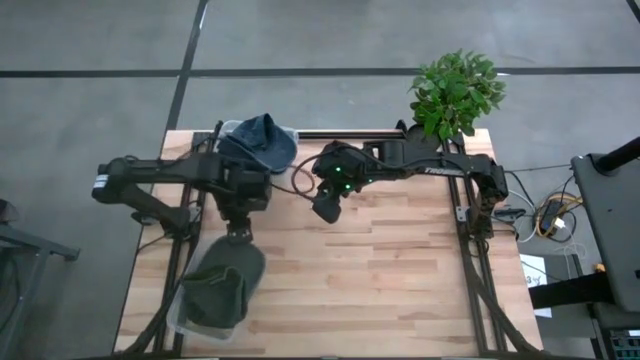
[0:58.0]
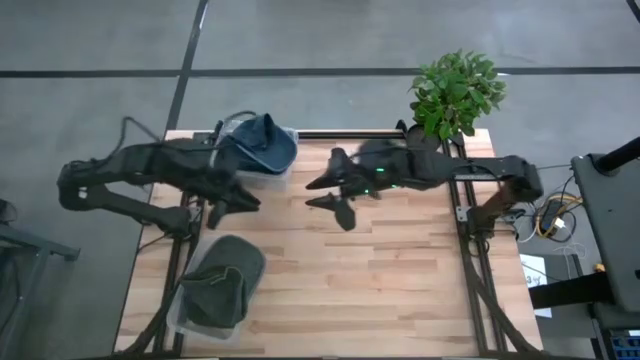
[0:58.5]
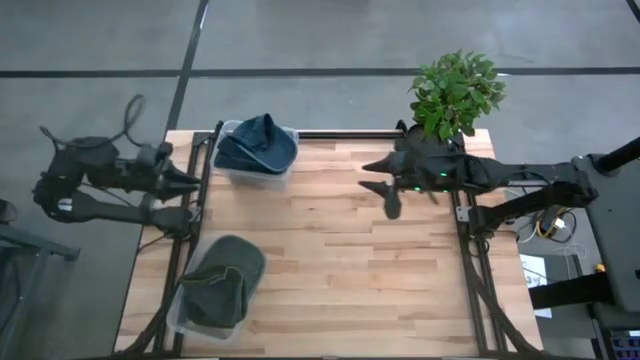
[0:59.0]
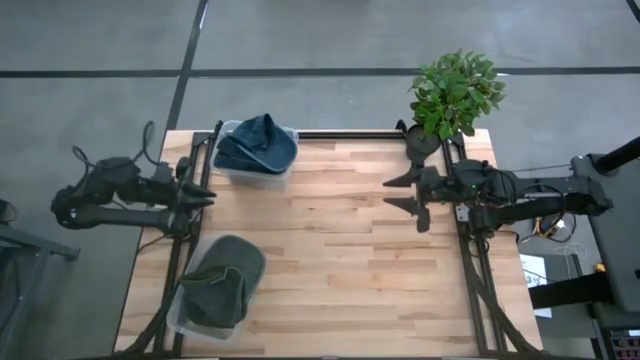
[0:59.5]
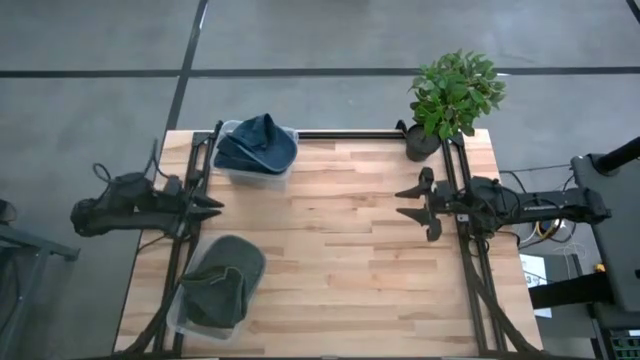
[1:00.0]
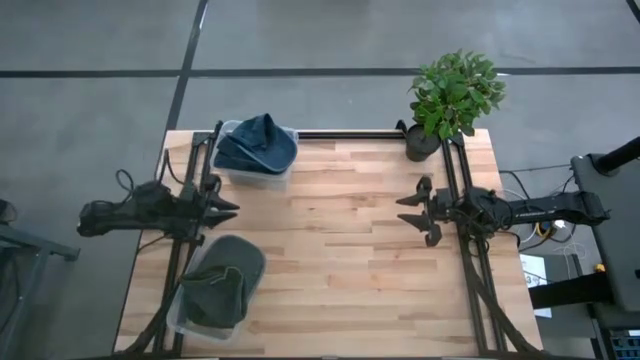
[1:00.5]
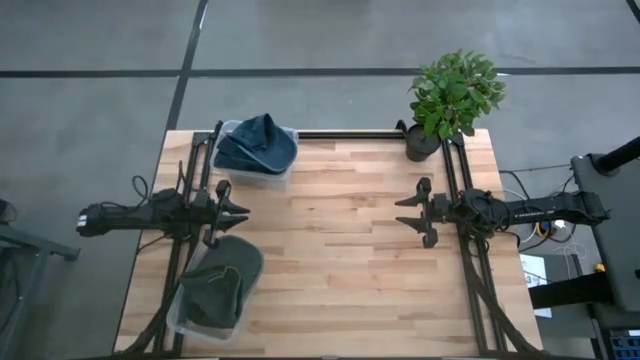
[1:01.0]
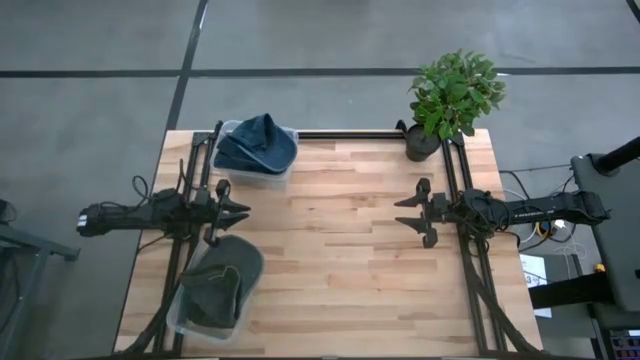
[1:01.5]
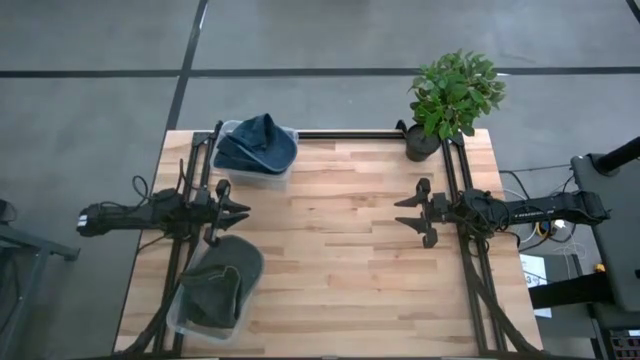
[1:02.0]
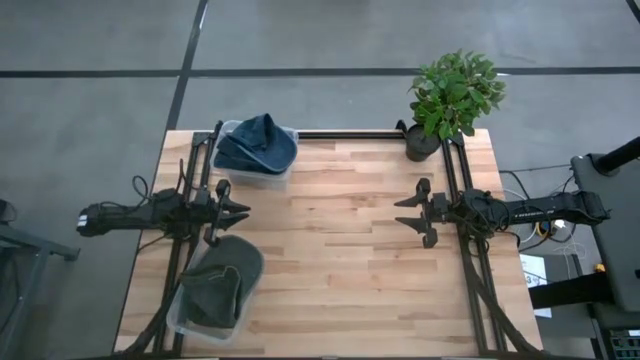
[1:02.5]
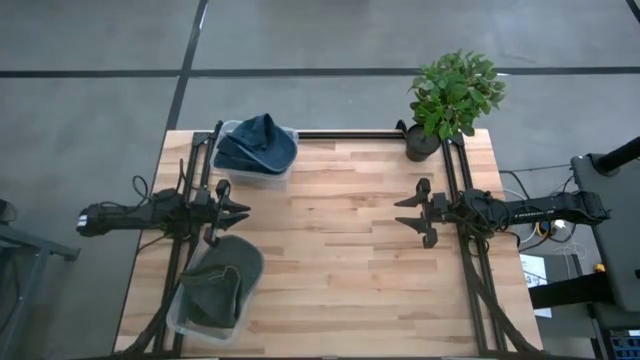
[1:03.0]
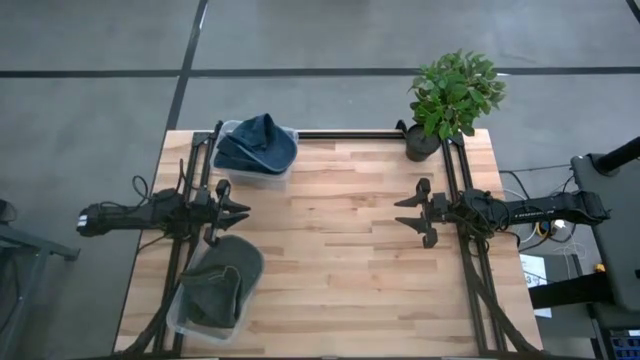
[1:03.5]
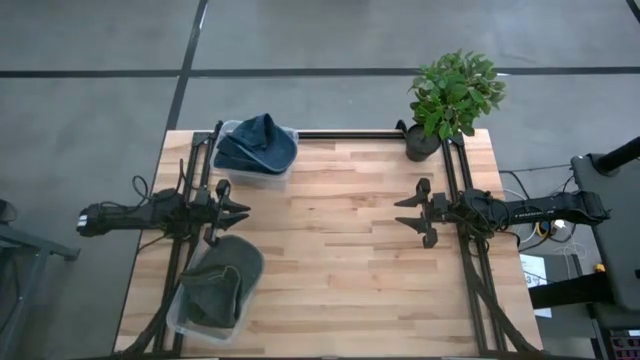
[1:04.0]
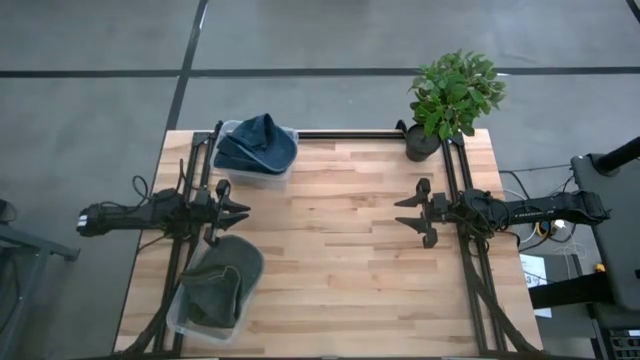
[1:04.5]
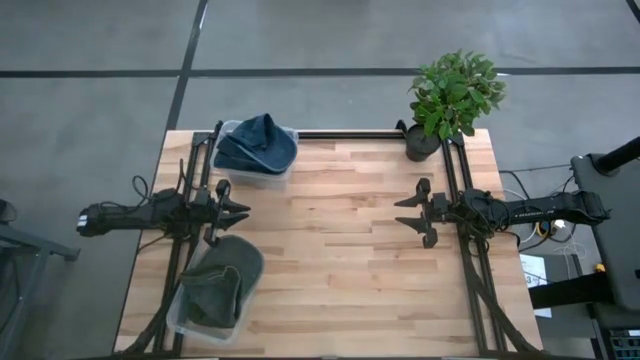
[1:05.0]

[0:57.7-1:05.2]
Task: Pick & Place hat
Return to Home Position

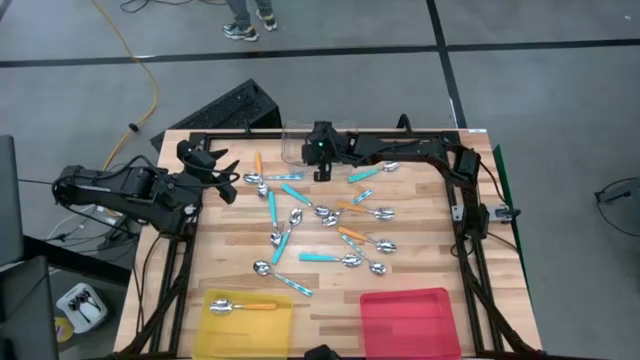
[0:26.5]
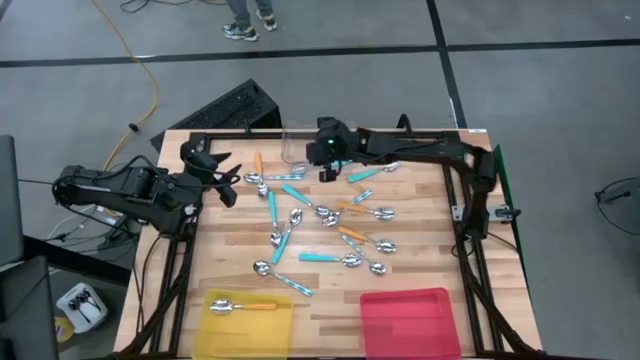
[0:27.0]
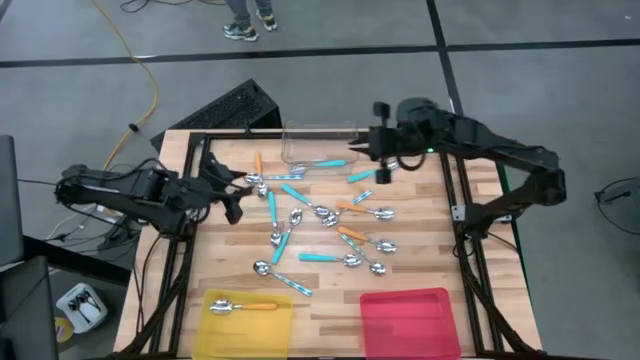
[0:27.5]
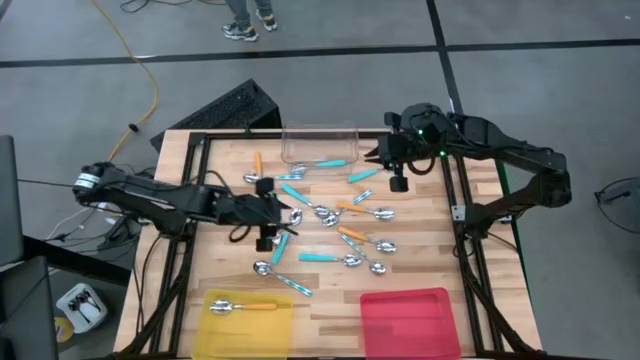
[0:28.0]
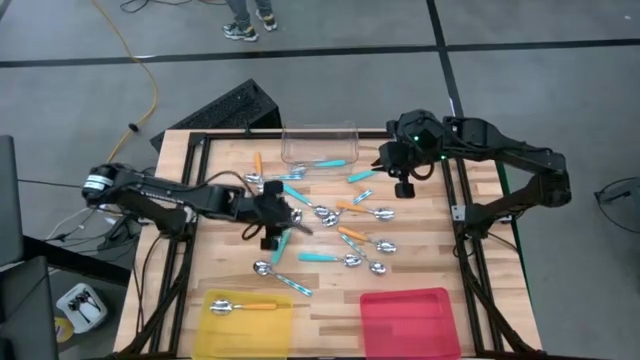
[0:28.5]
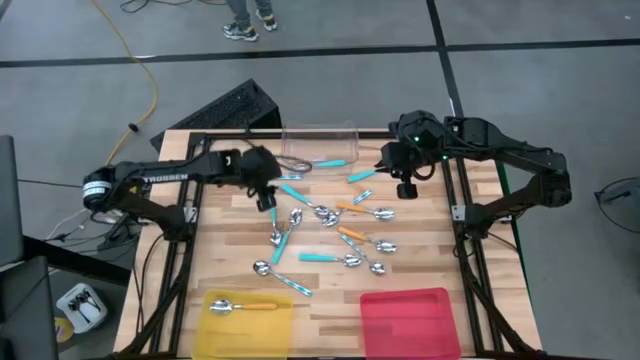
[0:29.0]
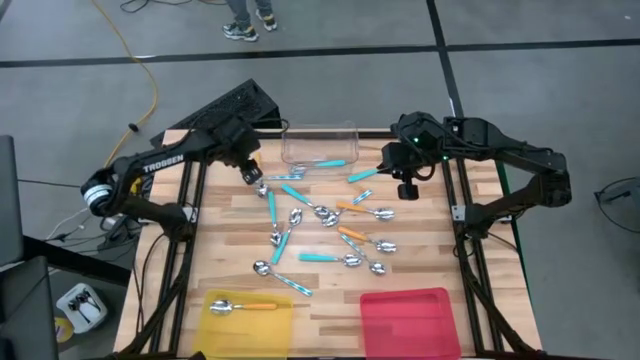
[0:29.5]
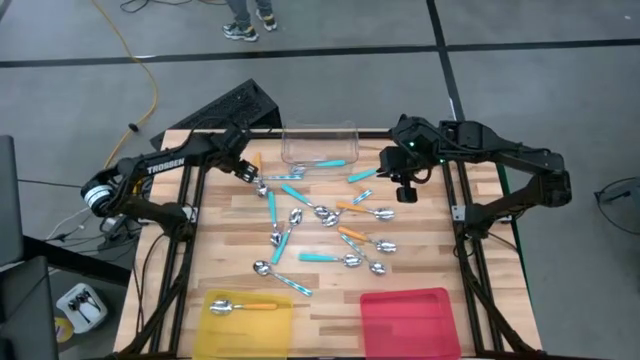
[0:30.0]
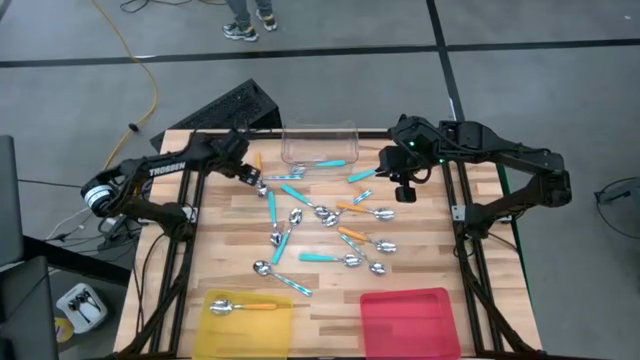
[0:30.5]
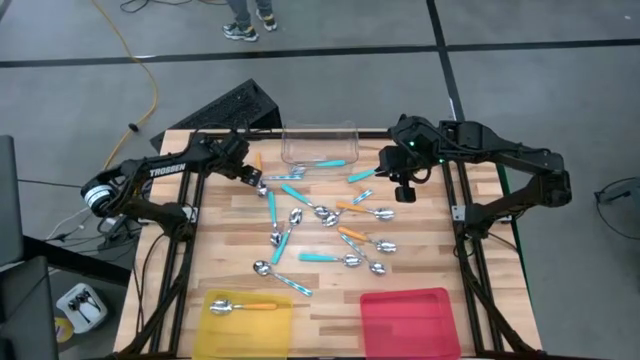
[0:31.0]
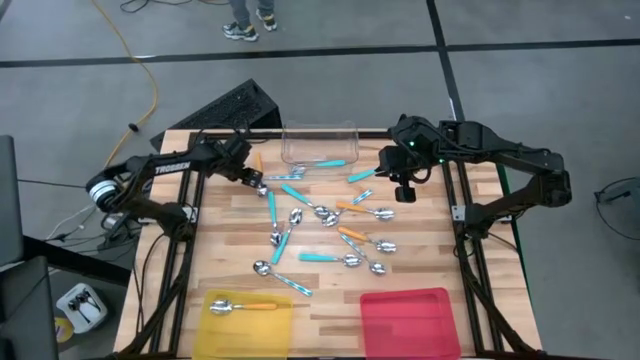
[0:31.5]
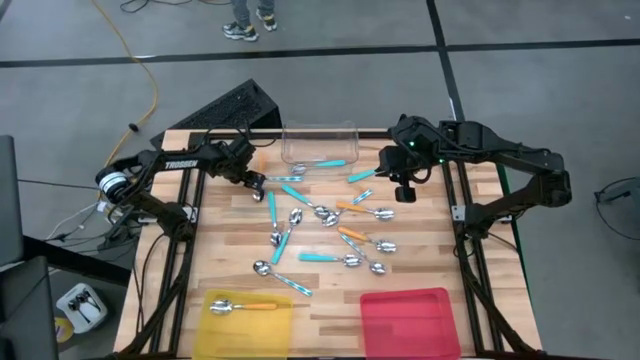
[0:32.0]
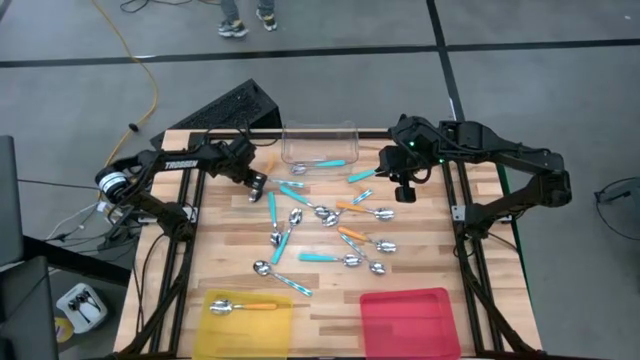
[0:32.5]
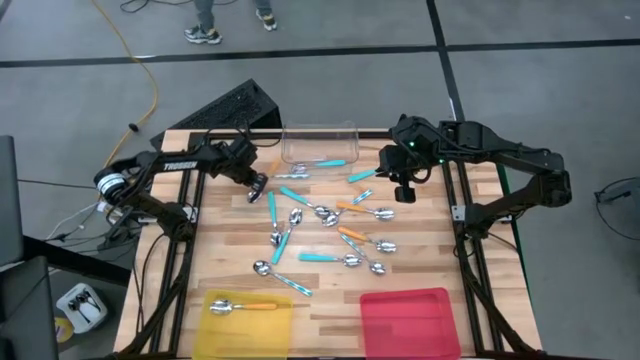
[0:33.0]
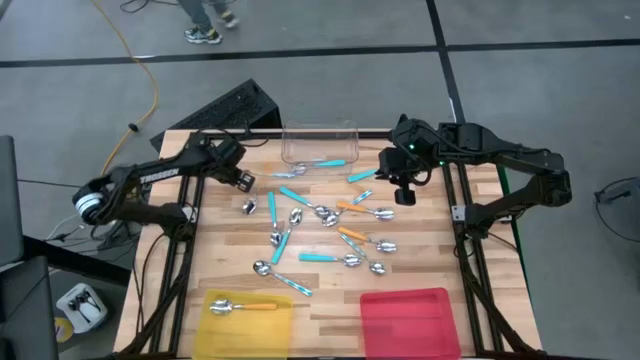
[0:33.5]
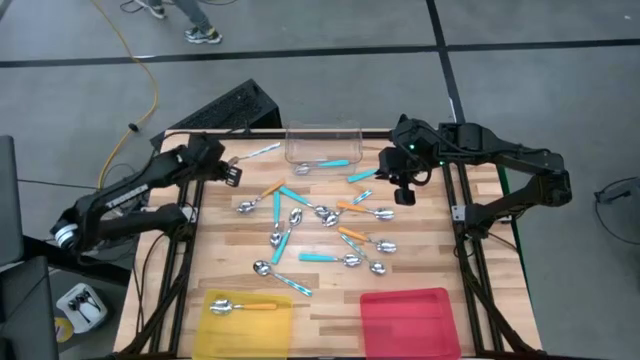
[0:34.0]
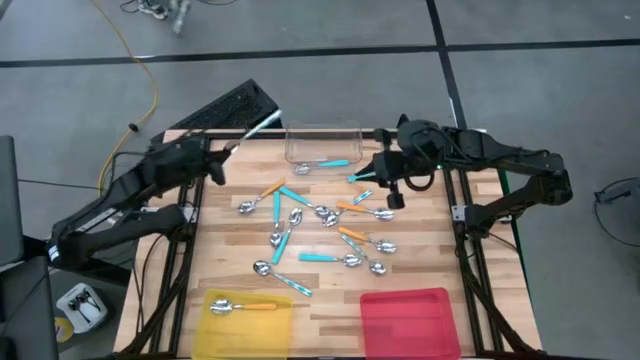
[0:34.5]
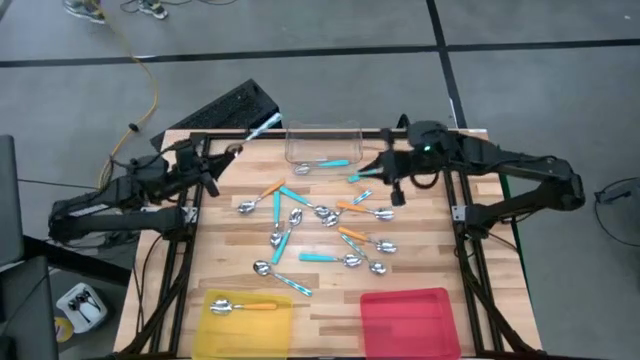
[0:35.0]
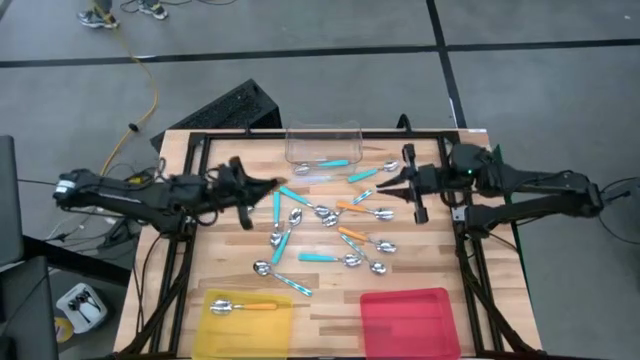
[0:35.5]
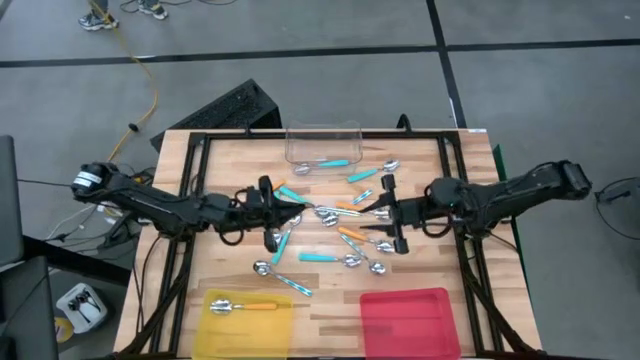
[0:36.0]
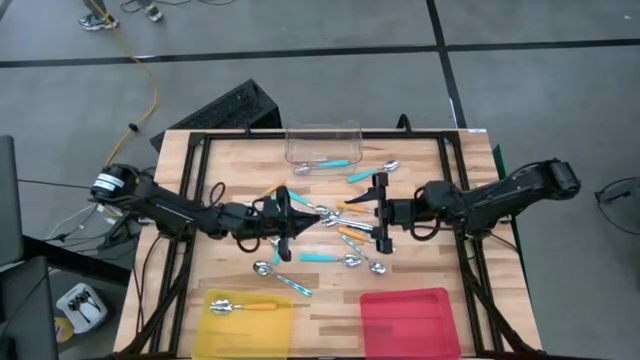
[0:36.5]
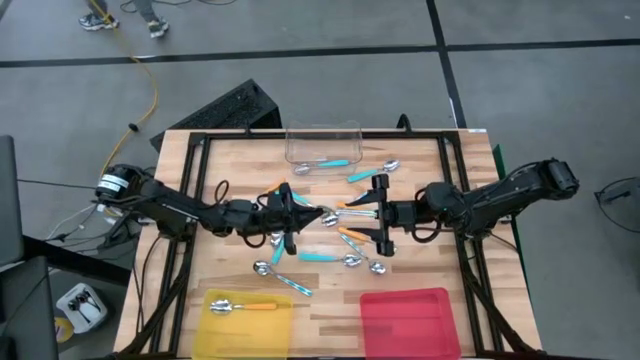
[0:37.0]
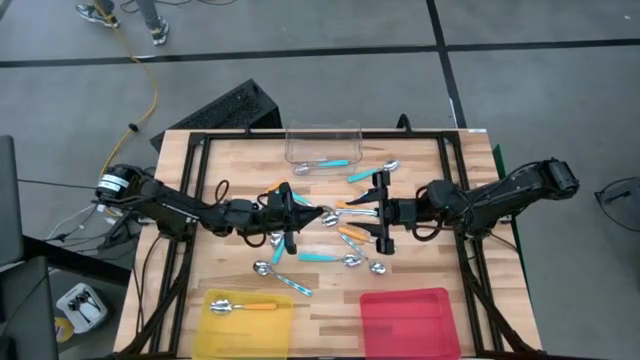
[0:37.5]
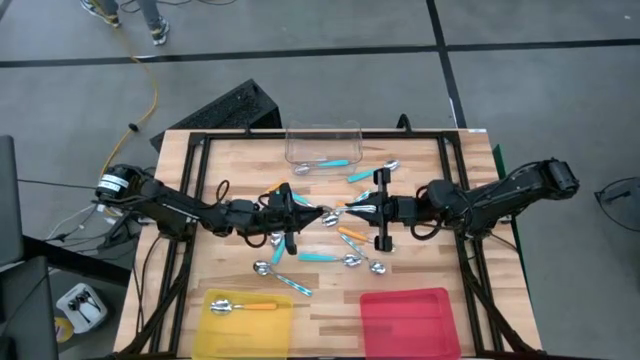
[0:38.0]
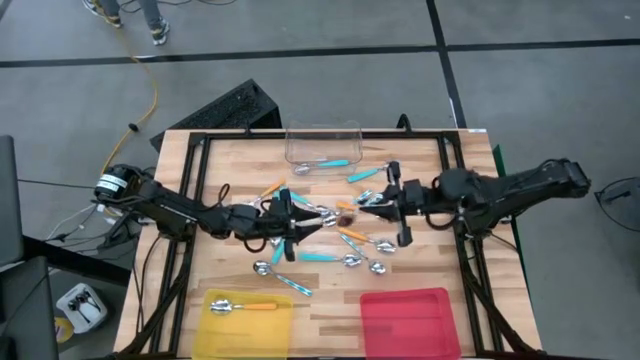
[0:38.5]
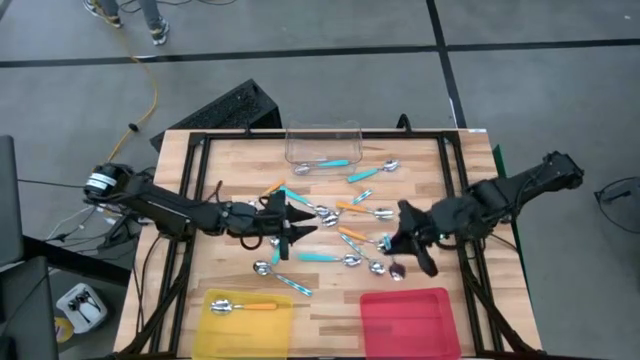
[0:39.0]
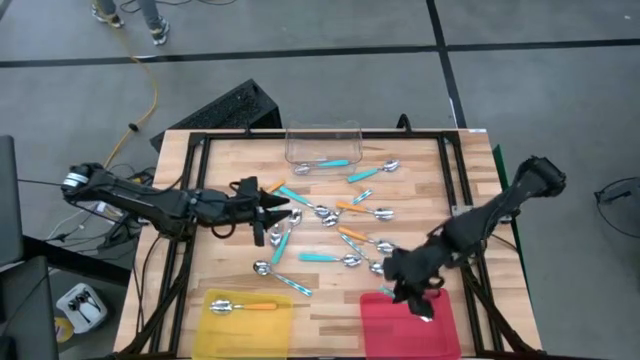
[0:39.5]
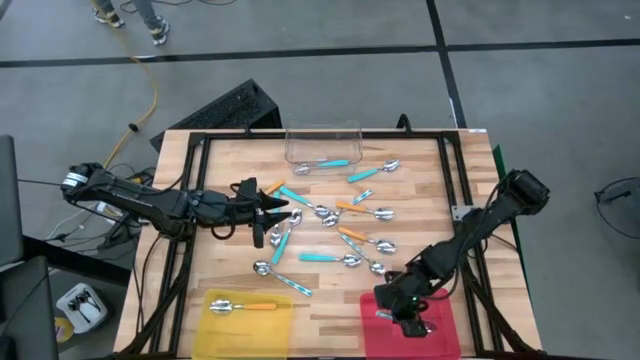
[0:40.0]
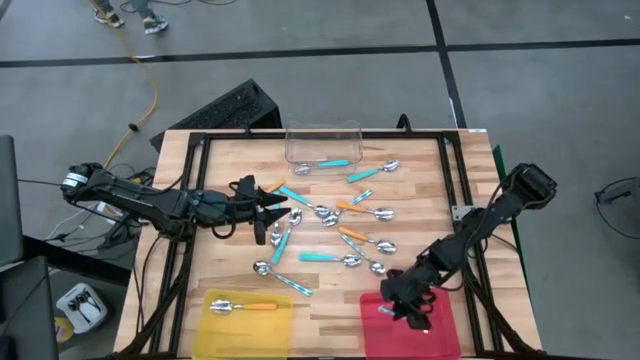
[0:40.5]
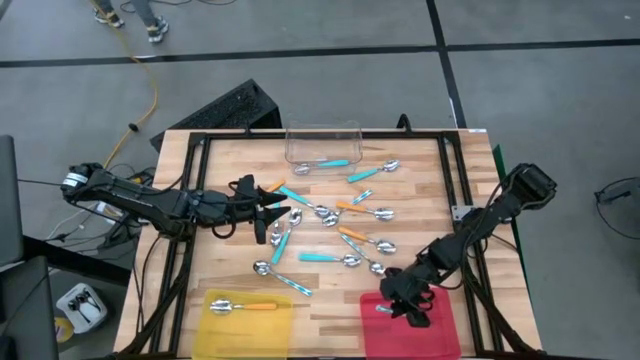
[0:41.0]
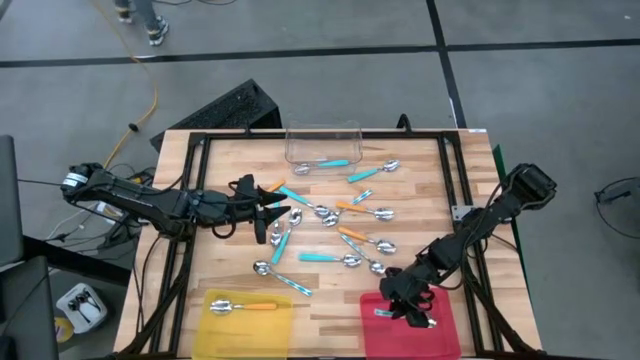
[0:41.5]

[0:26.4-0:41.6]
Task: Sort silverware by color (type)
Put the white and blue spoon into the red bin
